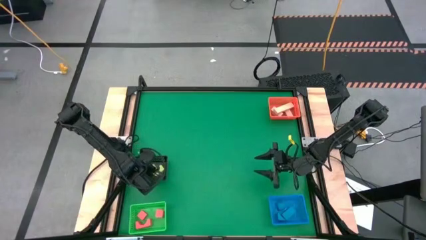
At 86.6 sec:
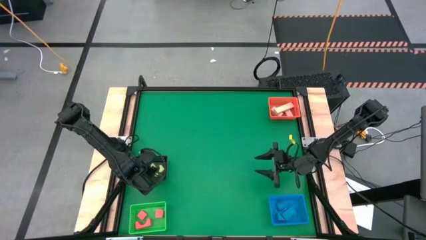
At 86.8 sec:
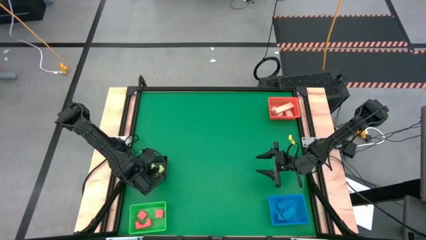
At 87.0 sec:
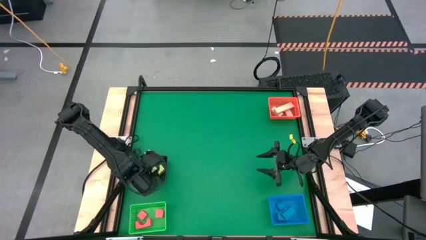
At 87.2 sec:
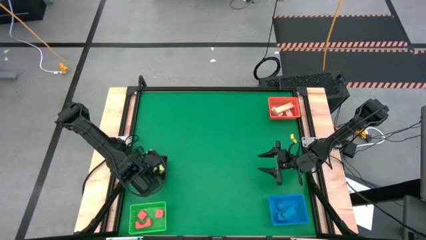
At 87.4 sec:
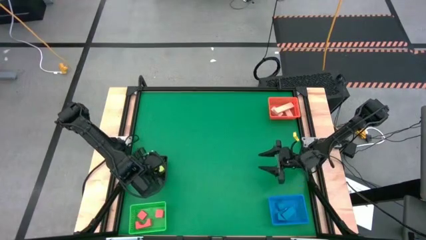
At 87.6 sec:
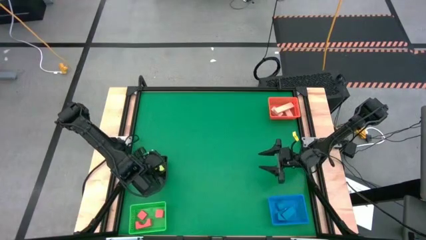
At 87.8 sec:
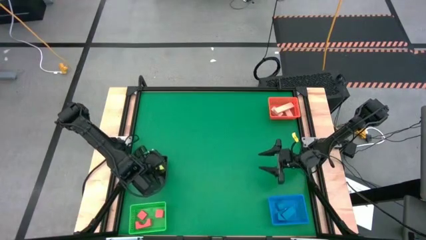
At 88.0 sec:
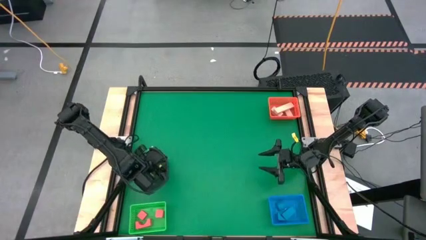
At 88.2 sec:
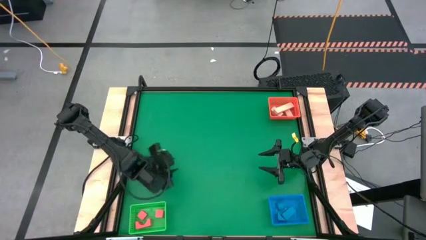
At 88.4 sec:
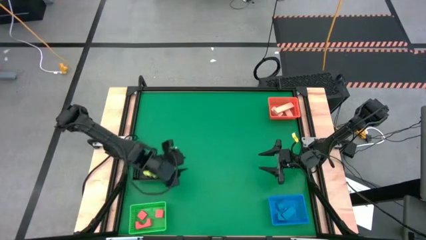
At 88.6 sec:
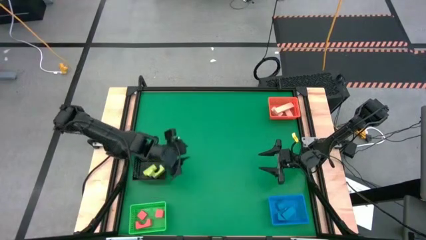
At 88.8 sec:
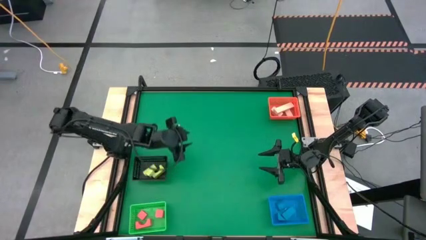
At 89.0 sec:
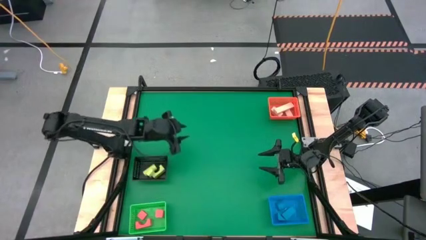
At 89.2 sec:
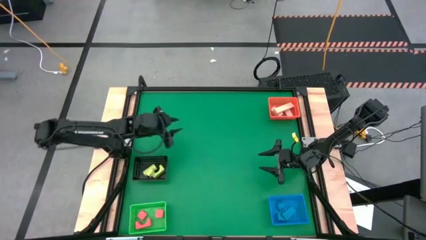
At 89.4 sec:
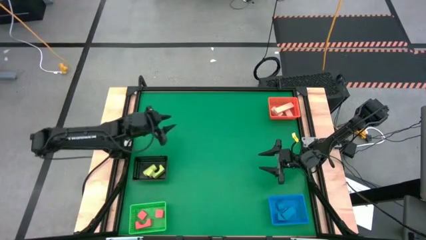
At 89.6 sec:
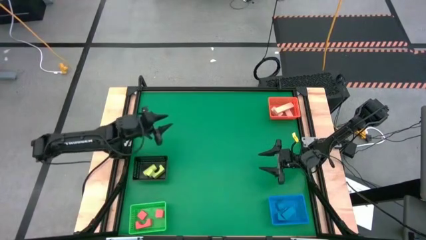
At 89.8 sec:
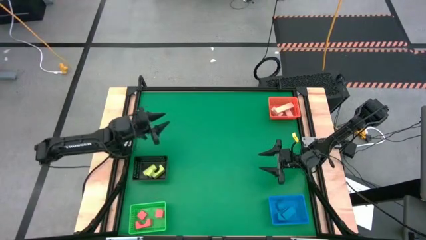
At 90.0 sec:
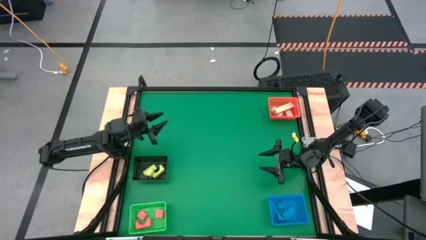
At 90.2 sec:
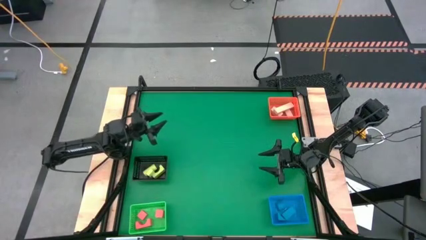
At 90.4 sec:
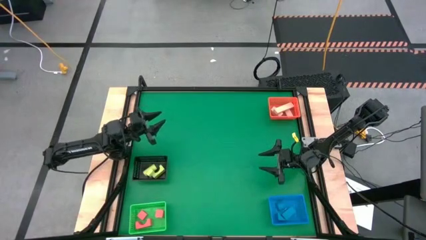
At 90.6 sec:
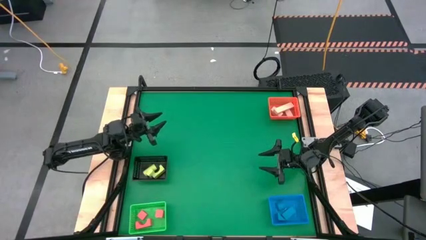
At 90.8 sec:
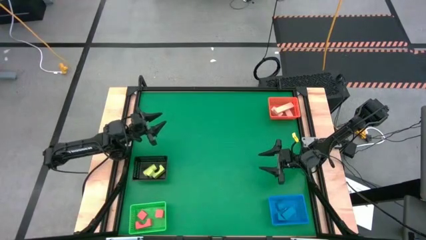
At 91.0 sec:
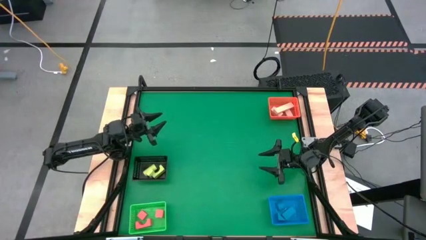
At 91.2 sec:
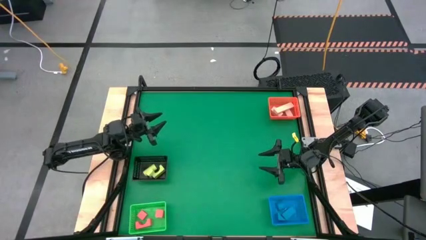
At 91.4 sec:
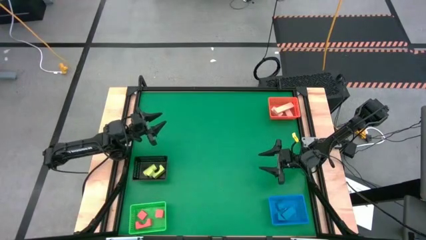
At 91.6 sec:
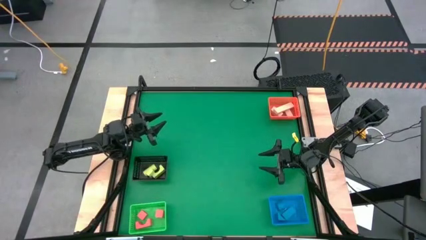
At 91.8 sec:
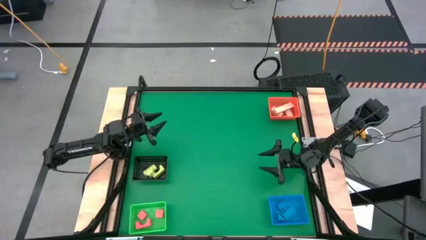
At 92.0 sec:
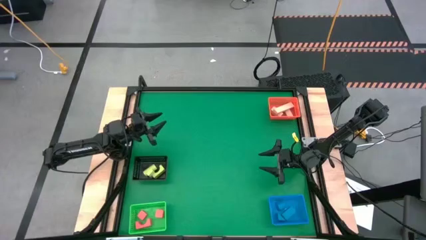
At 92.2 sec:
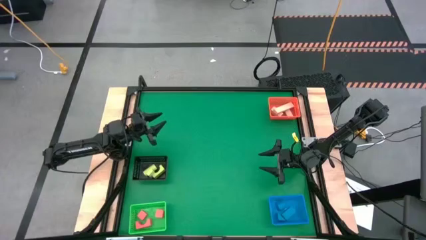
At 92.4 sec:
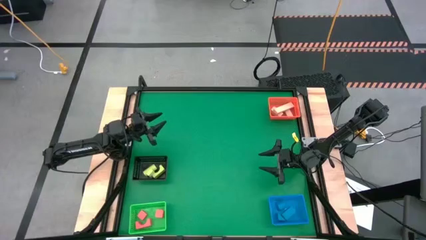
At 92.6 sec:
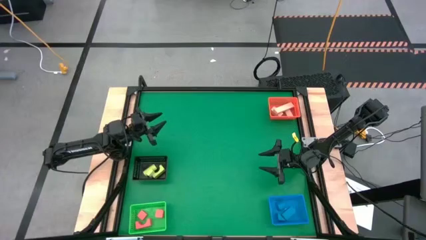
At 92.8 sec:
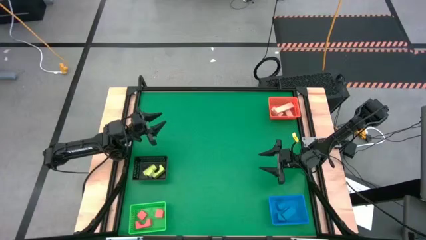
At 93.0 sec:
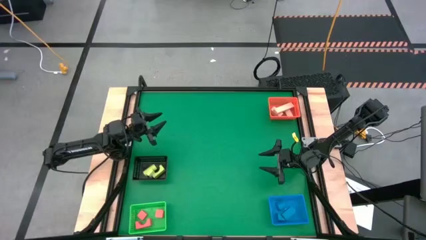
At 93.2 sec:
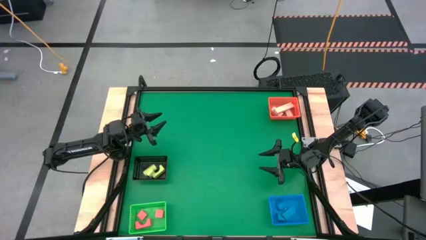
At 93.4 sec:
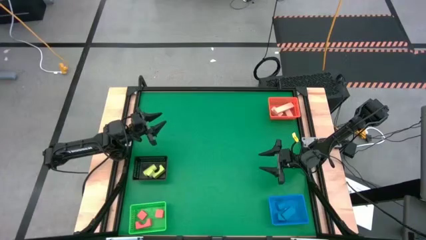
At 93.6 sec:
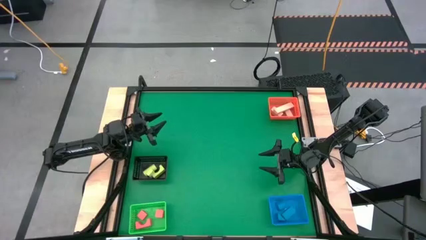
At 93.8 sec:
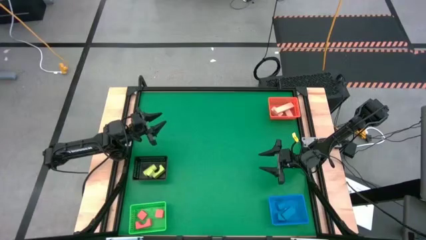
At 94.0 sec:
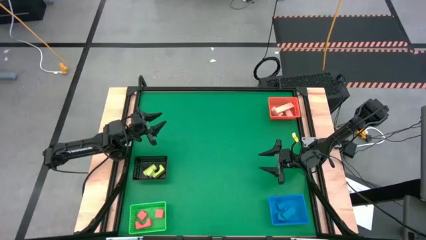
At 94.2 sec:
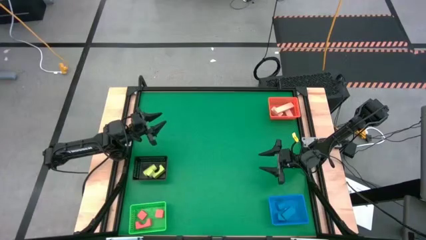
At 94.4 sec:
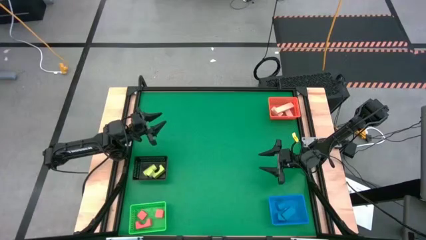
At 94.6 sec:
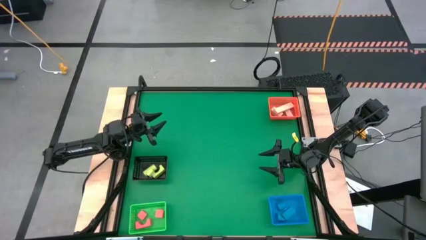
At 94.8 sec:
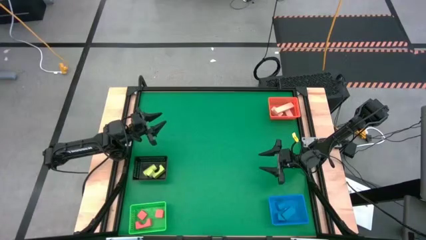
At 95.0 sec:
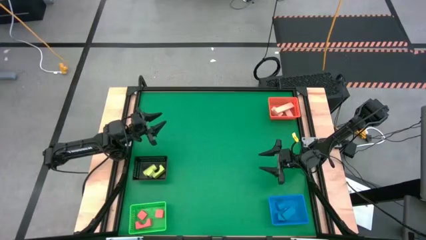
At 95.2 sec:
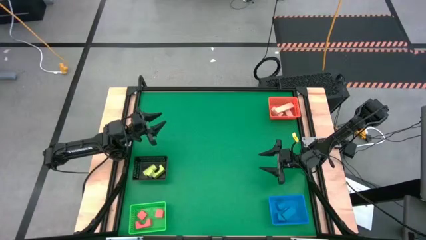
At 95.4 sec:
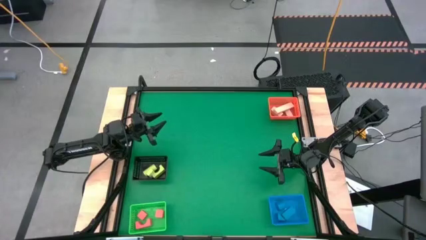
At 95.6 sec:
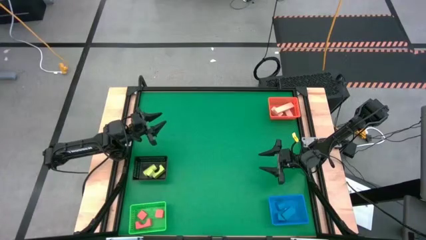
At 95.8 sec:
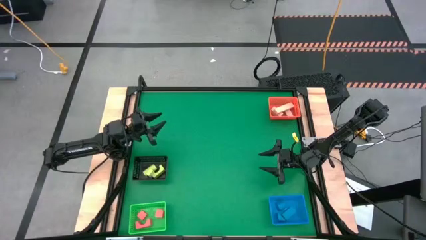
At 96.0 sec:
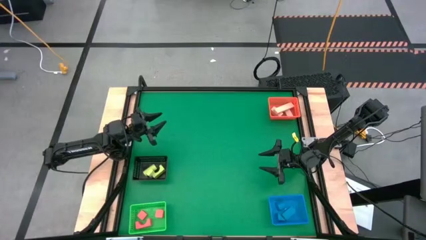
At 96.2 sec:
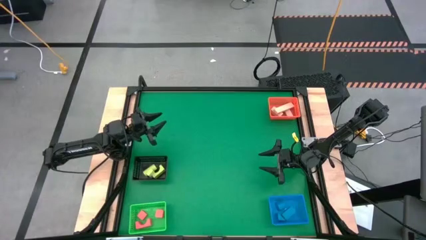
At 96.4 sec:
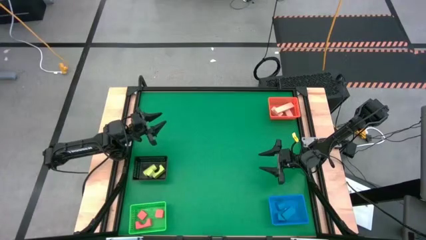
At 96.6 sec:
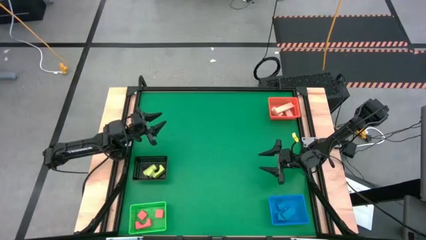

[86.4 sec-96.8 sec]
Task: Sort & place blocks by color
Return to Home Position
